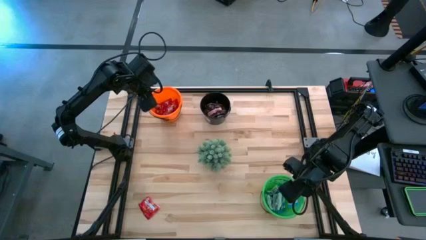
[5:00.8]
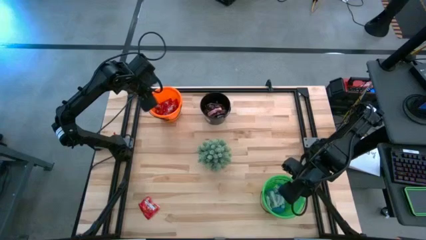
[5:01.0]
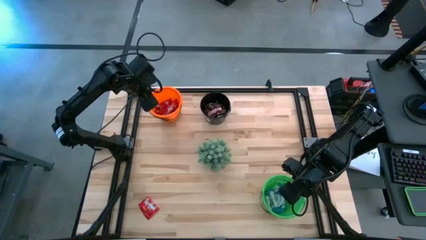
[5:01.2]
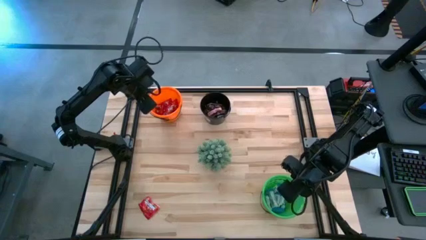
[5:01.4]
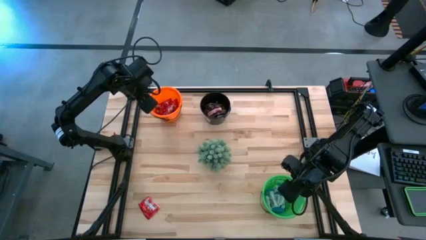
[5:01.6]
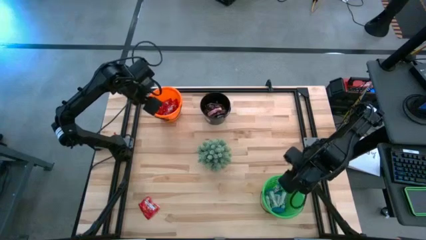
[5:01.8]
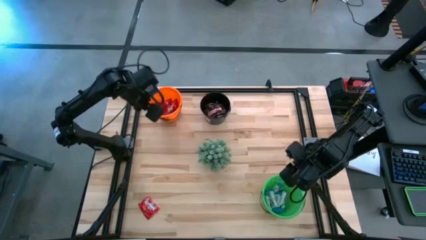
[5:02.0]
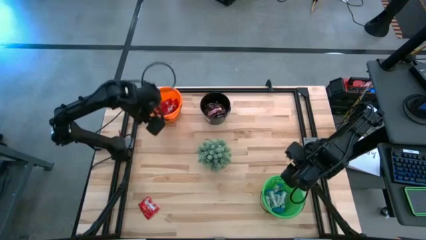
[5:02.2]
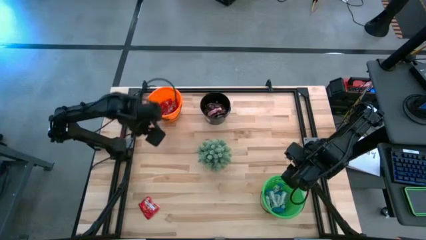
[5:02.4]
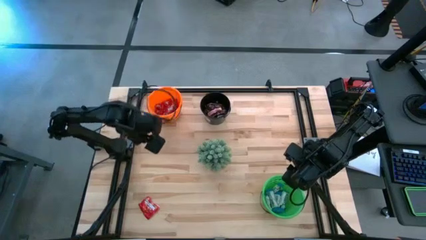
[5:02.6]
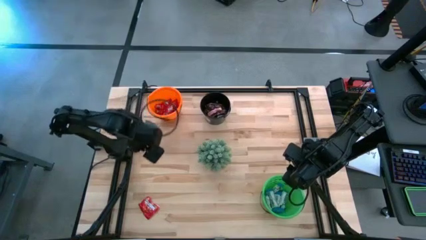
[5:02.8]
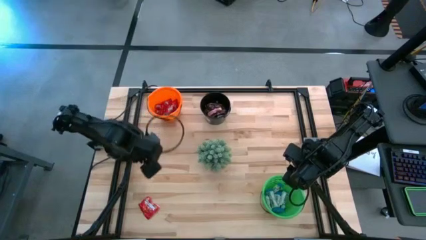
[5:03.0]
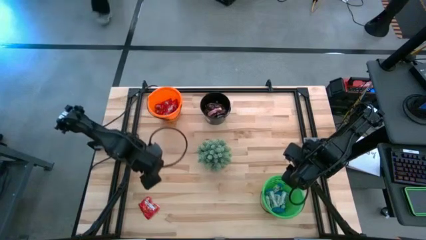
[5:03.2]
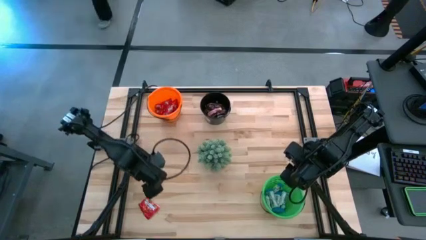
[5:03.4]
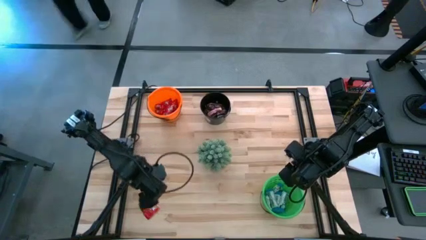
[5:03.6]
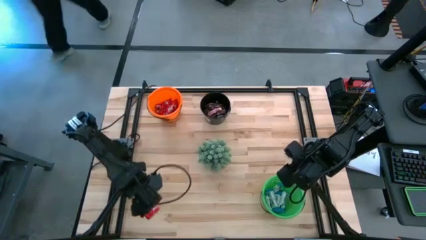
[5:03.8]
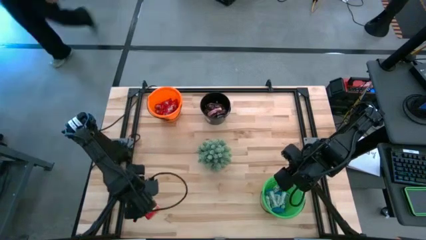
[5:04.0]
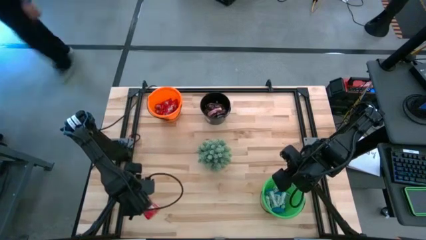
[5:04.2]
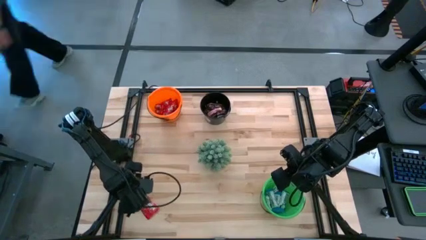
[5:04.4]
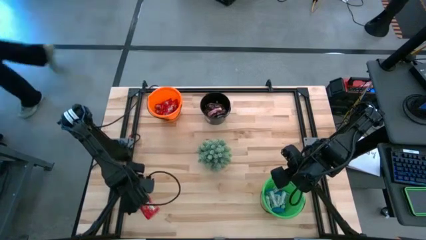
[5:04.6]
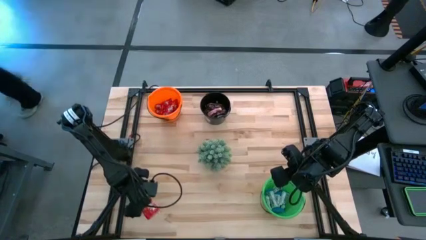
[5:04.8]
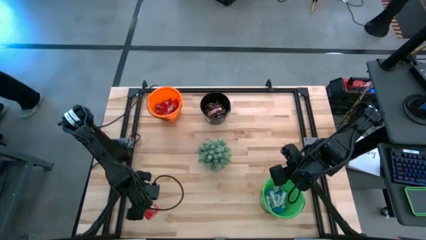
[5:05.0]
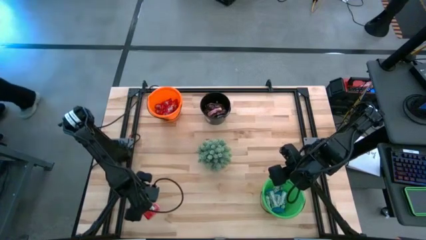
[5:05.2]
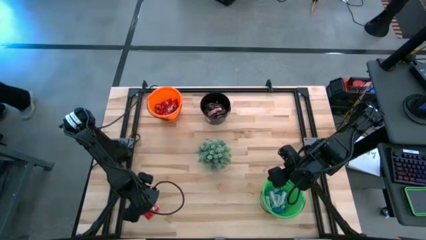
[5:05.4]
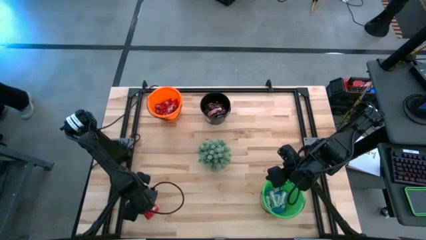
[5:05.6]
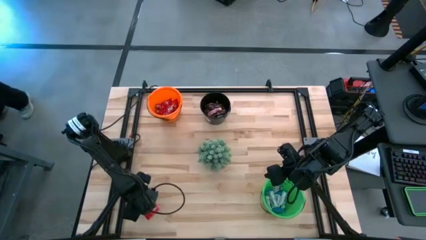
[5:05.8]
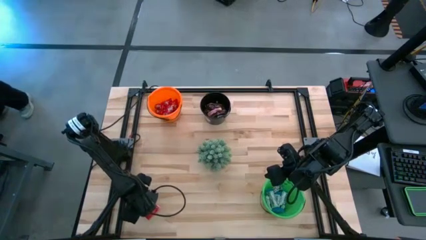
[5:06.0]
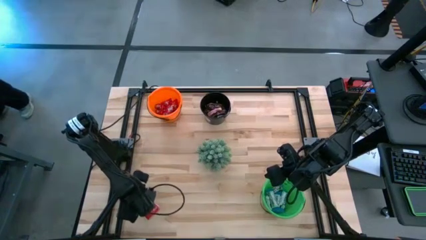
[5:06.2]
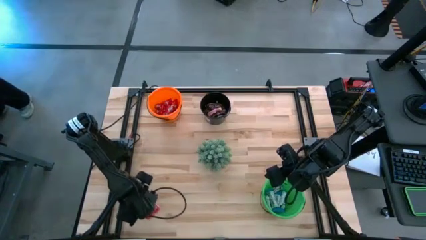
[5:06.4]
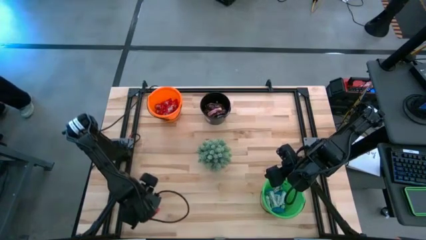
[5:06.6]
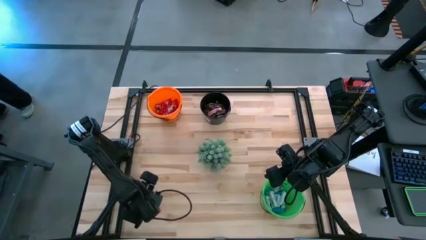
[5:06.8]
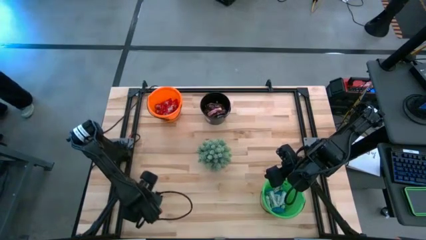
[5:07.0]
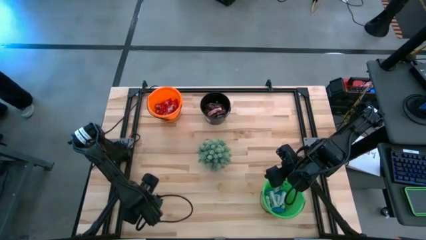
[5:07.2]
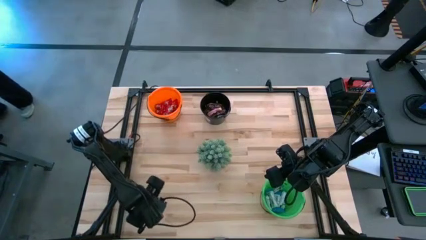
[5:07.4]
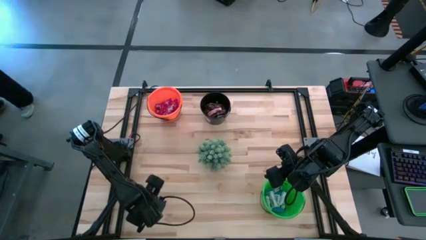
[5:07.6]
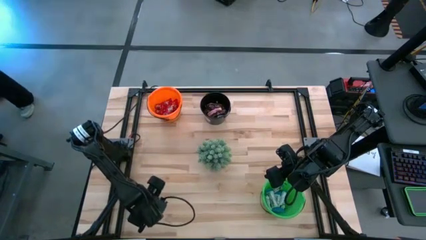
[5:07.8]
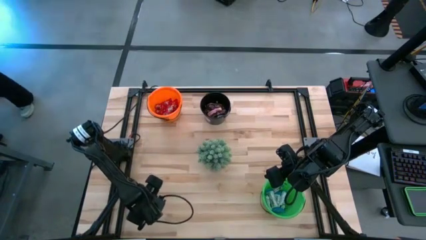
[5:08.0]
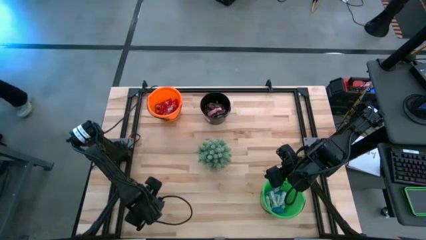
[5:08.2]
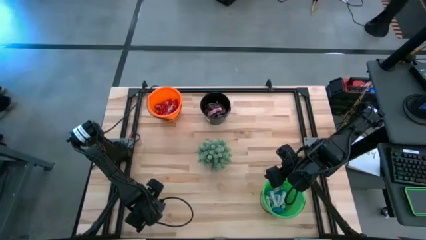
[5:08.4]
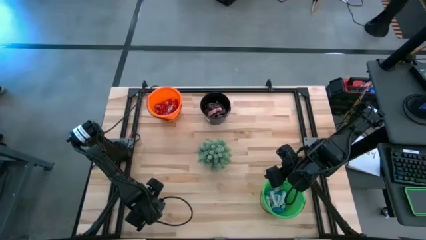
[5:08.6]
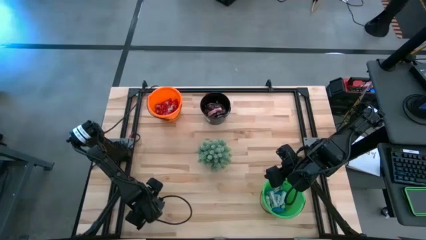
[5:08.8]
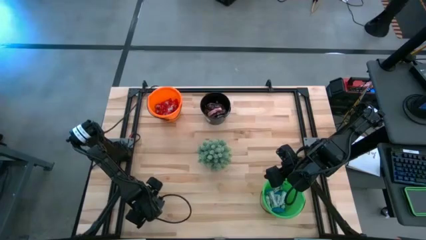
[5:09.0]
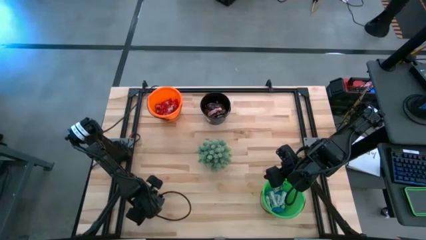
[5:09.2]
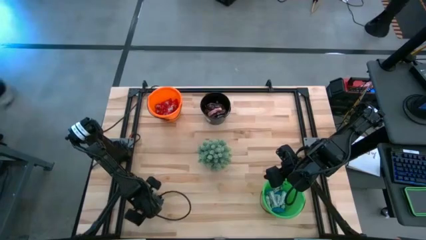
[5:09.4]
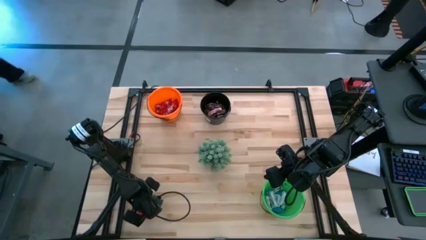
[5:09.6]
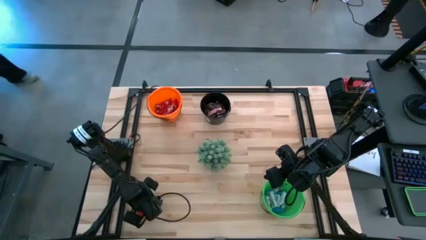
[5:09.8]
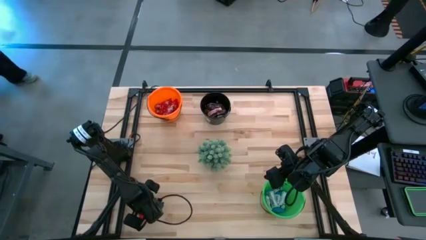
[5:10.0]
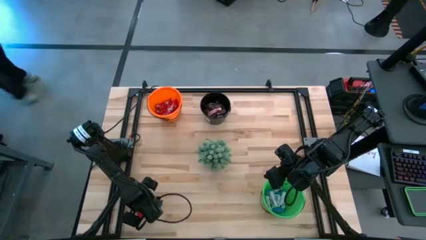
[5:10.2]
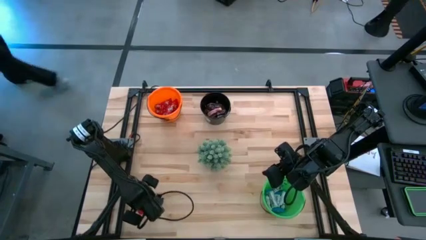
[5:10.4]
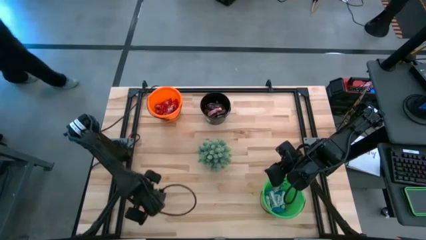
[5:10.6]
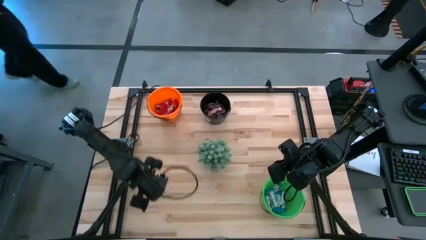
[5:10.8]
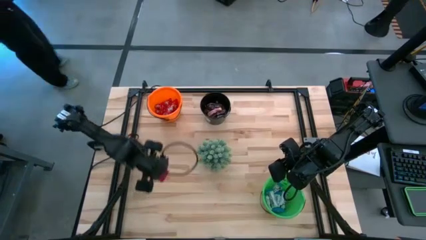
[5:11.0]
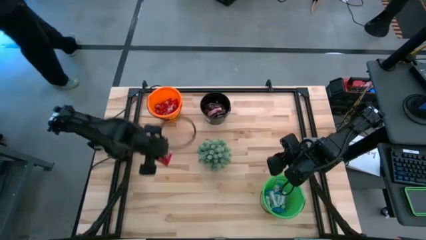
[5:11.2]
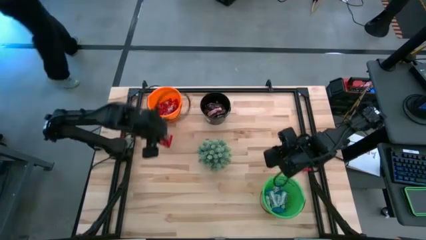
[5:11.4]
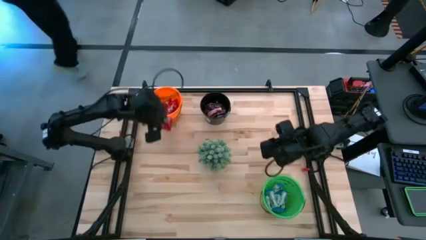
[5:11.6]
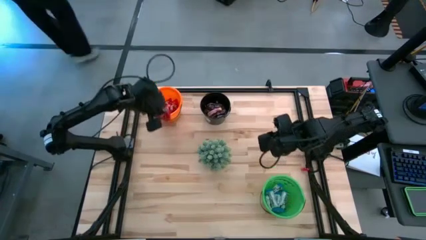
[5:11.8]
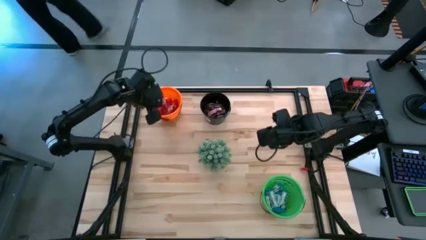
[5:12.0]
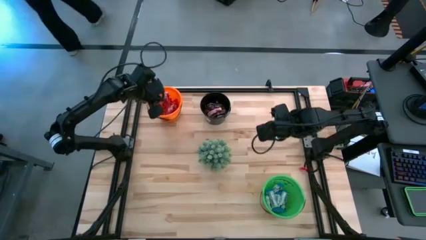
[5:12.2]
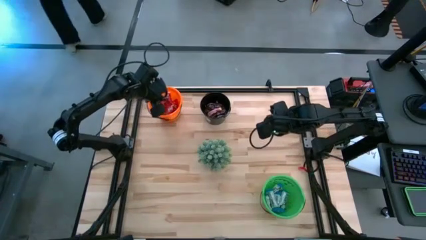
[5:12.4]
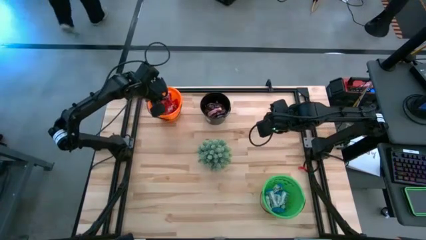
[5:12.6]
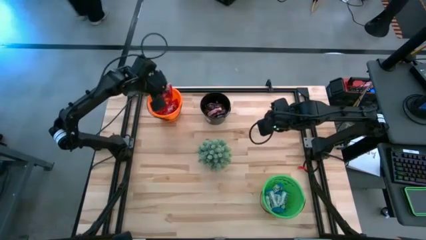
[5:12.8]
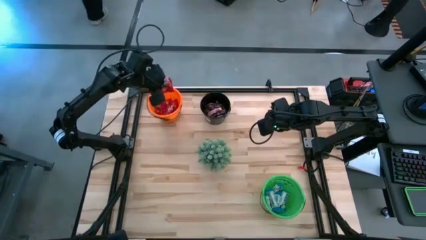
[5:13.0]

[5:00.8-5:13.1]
Task: Sort candy
Put the red candy into the orange bucket
